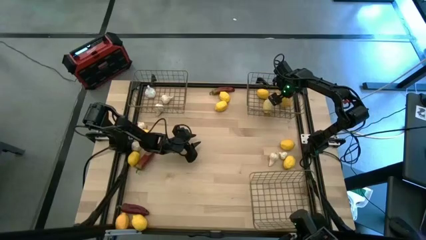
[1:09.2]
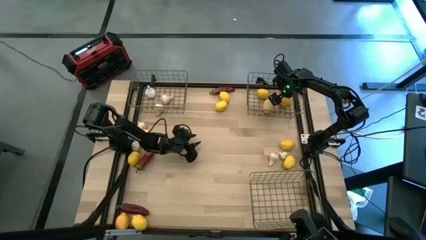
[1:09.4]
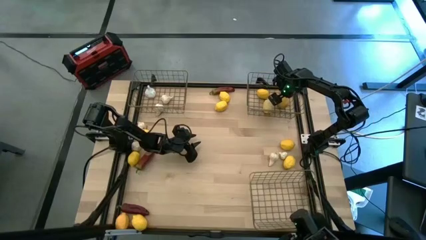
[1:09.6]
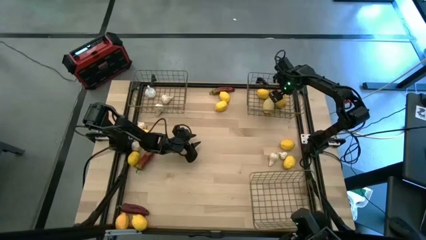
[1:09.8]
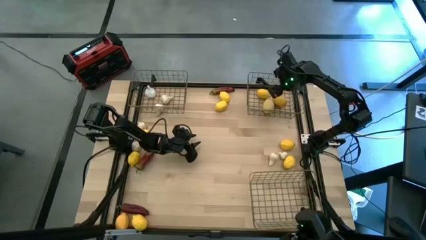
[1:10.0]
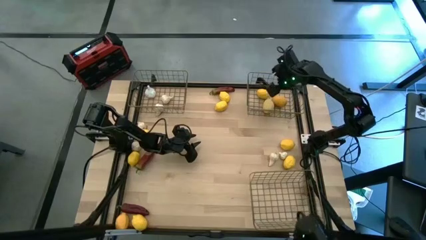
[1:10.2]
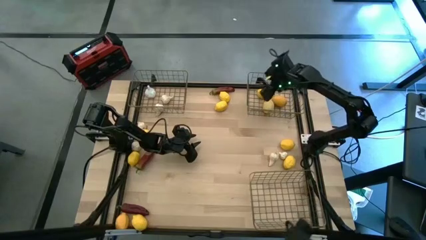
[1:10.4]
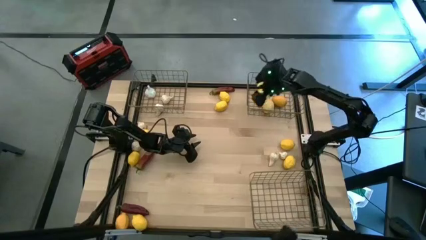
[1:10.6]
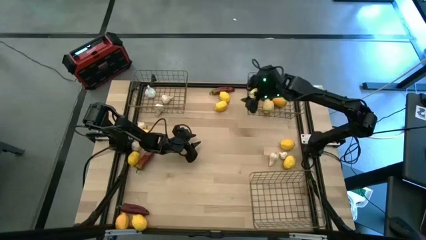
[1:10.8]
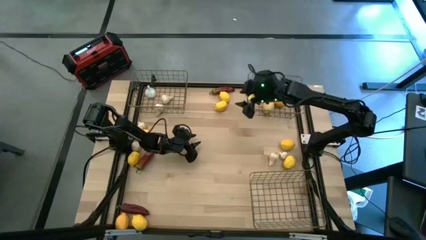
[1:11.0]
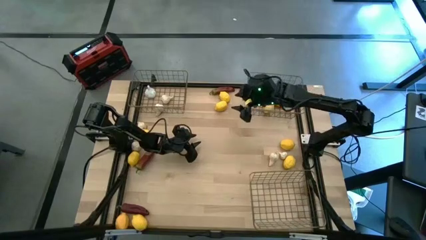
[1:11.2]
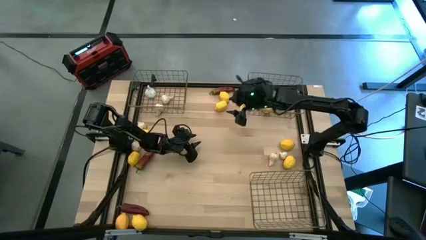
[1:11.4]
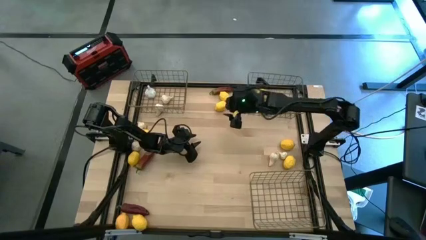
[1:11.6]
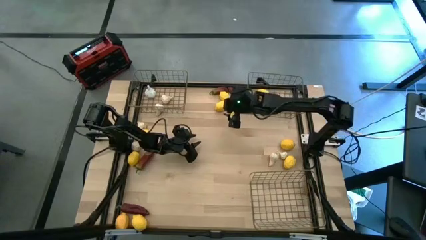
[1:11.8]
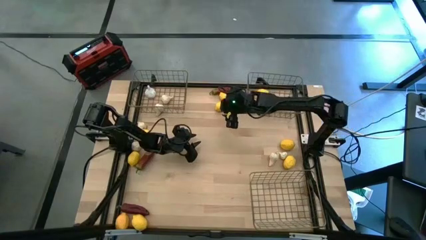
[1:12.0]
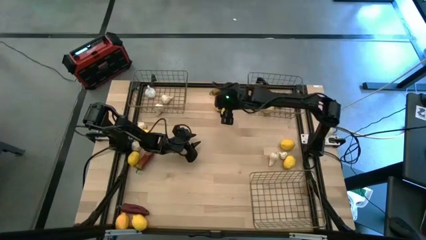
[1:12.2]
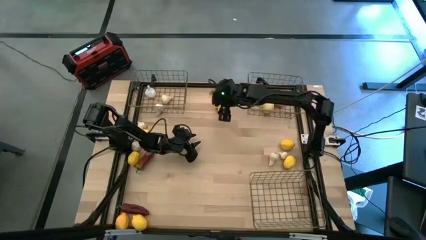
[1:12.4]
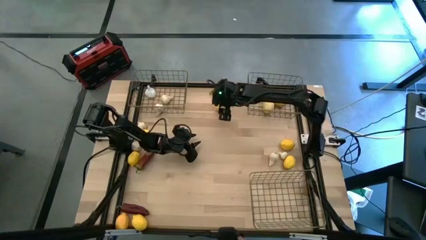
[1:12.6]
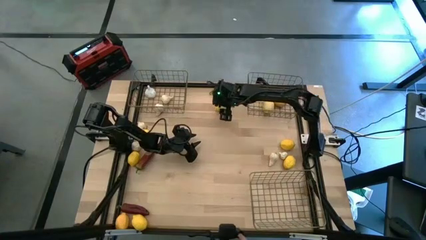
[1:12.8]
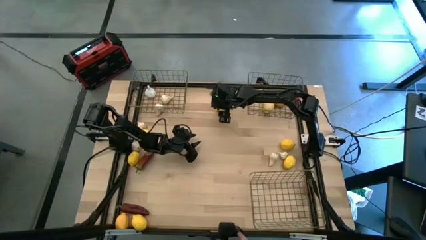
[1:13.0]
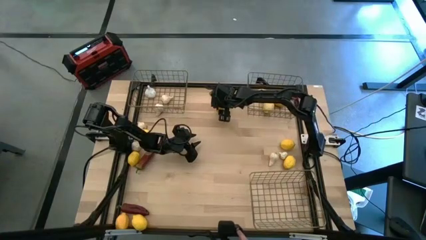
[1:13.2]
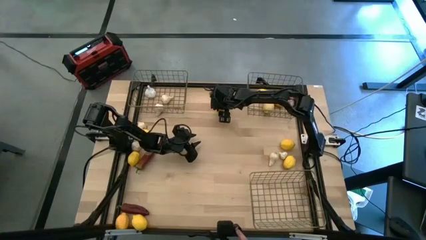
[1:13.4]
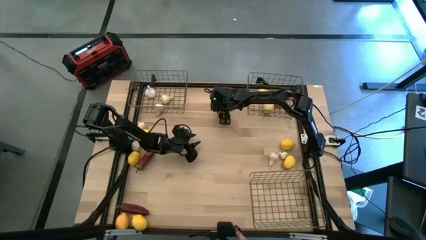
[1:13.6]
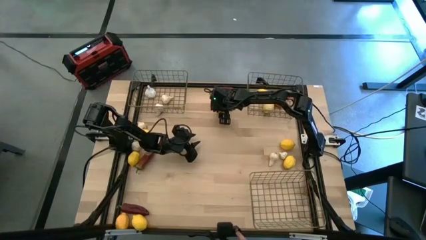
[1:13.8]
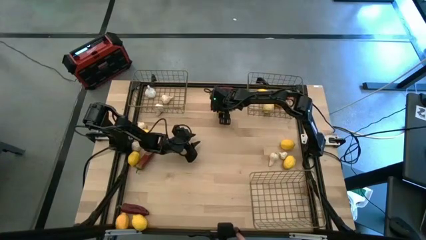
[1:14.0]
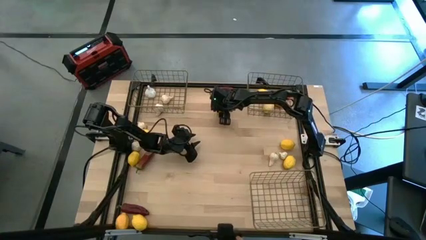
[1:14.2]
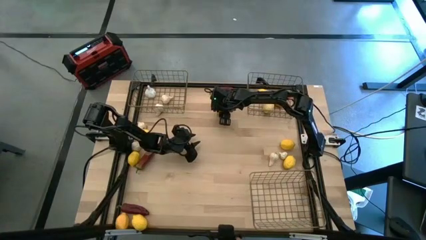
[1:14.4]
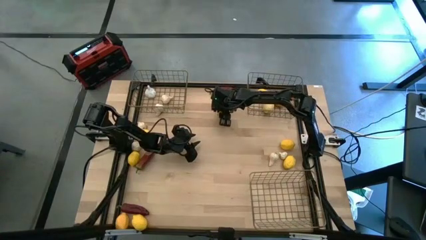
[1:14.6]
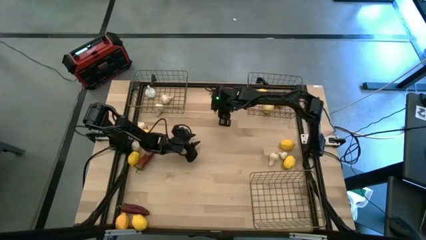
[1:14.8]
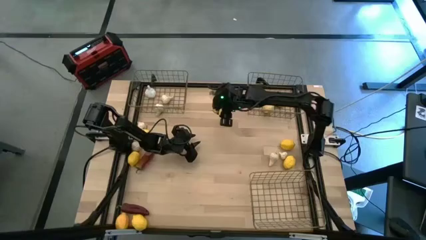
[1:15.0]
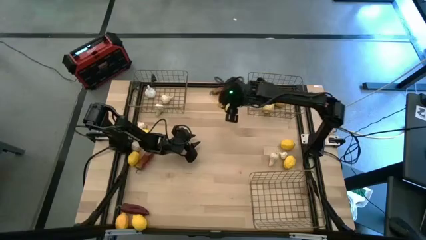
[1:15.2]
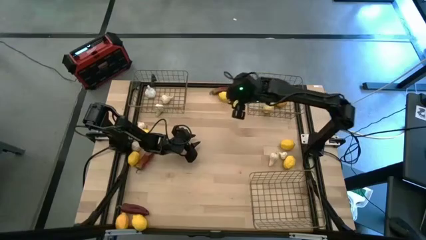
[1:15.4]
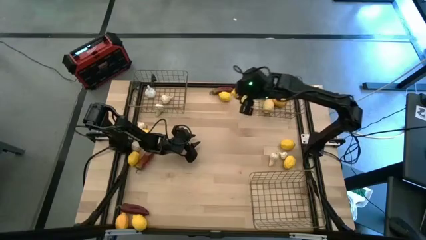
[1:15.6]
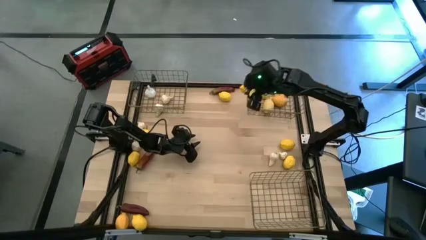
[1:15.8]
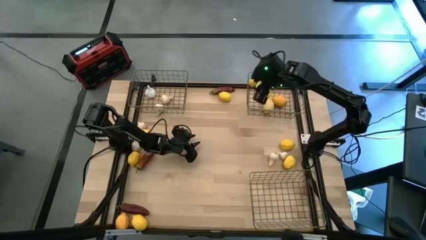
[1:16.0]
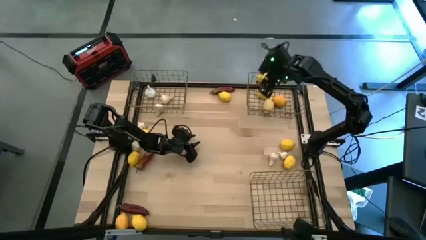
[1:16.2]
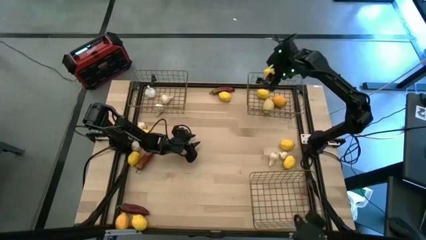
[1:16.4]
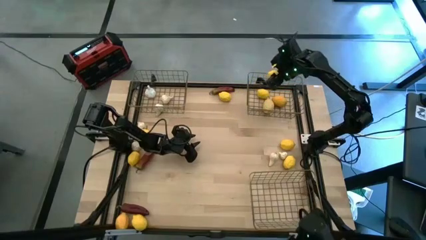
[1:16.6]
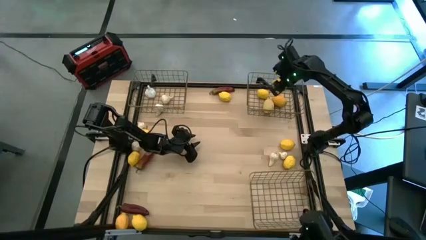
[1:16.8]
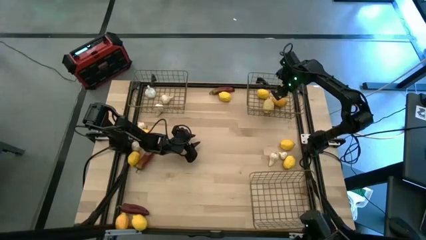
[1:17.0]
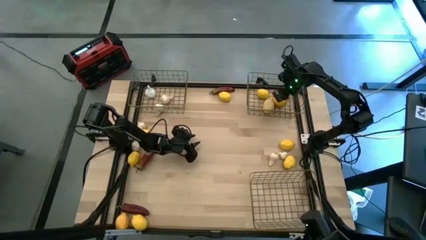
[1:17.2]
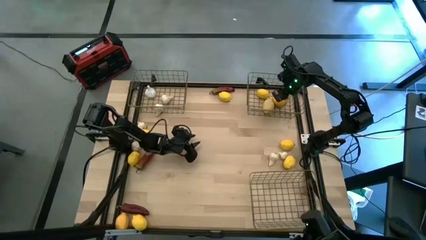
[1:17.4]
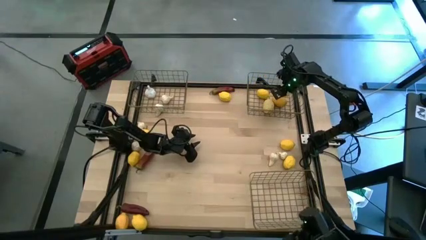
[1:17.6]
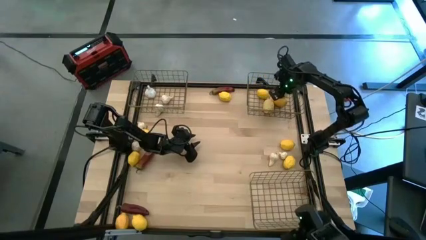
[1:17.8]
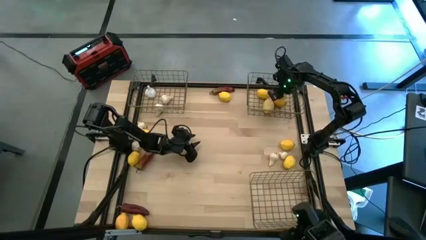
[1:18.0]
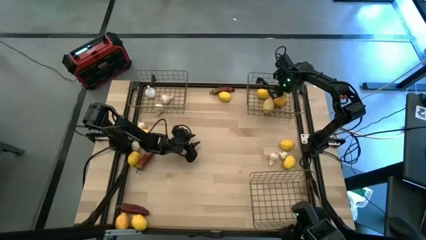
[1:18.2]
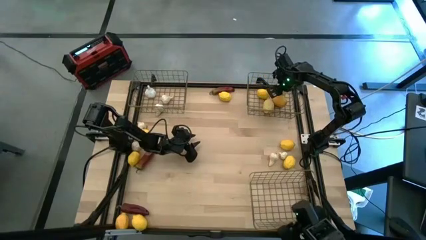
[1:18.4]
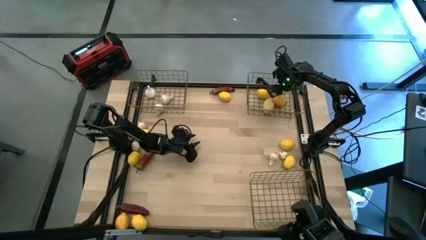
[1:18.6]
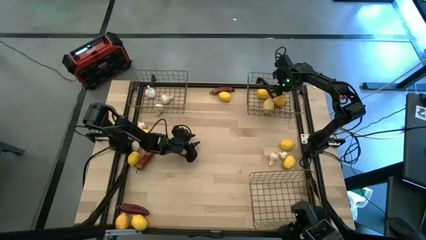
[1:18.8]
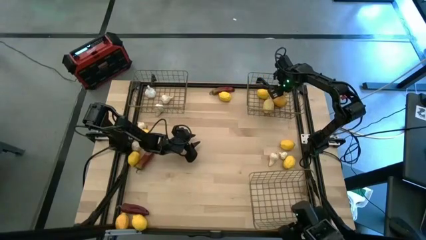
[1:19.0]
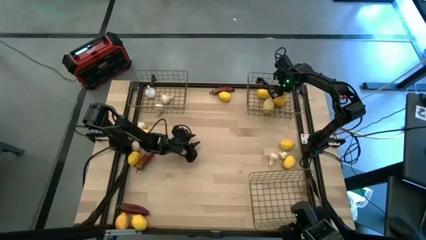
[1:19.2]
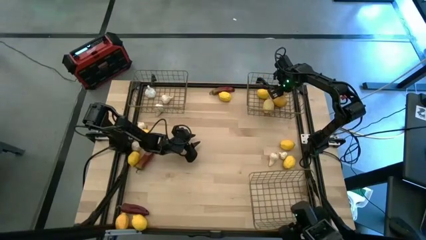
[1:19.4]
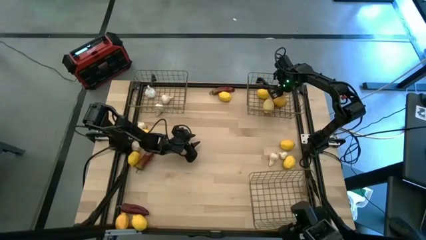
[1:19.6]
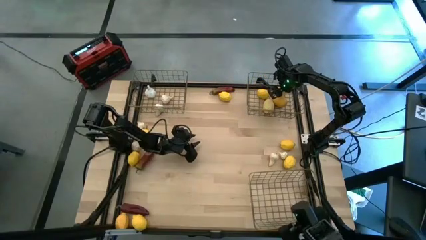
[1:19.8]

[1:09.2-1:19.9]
Task: Sort produce into baskets
Put the yellow lemon into the top right wire basket

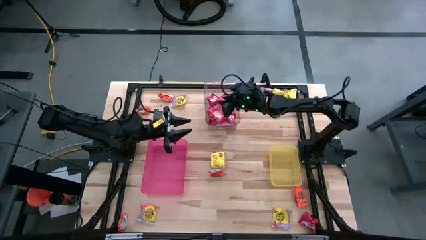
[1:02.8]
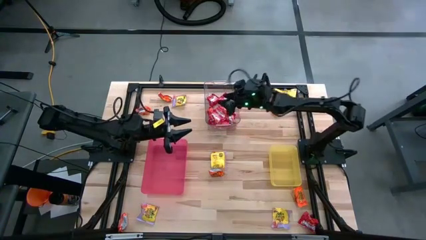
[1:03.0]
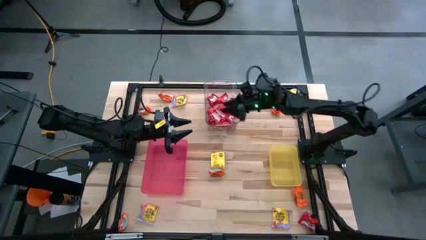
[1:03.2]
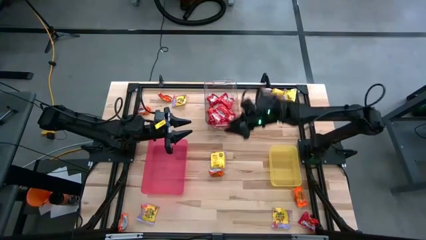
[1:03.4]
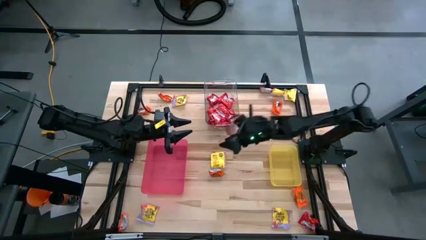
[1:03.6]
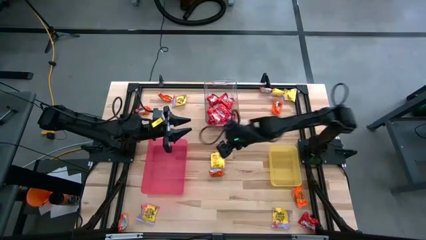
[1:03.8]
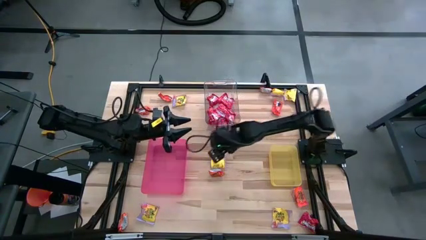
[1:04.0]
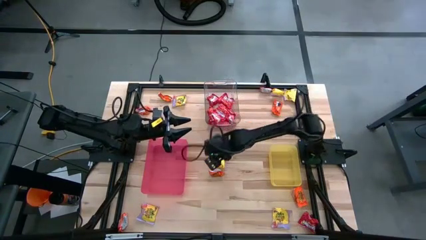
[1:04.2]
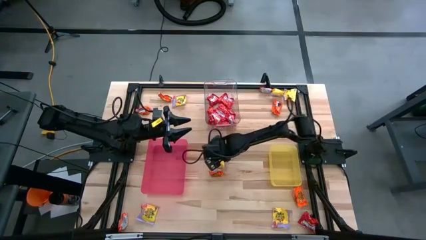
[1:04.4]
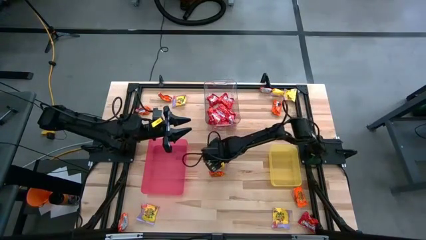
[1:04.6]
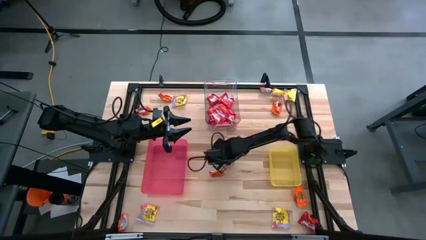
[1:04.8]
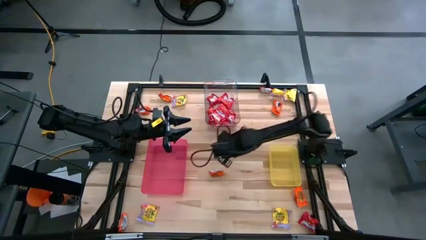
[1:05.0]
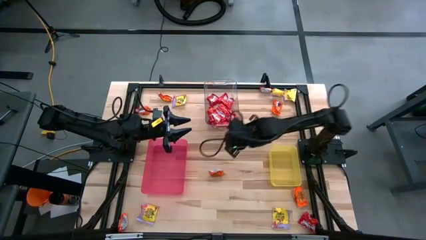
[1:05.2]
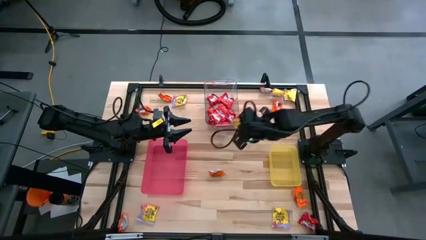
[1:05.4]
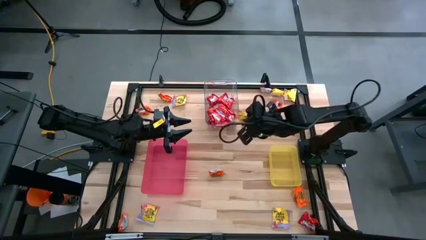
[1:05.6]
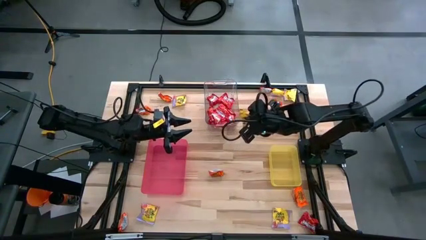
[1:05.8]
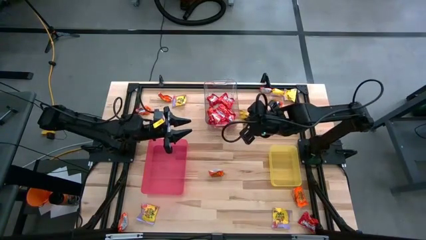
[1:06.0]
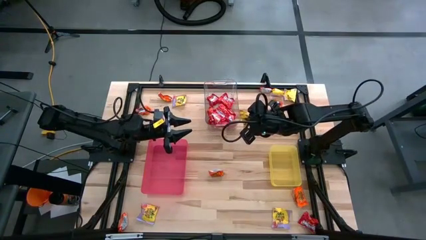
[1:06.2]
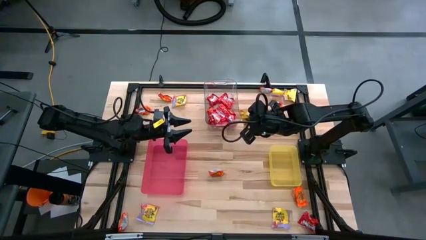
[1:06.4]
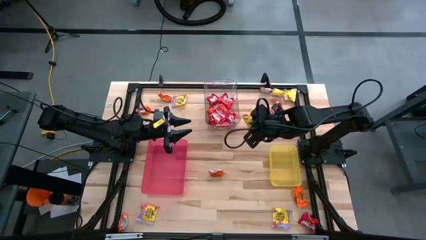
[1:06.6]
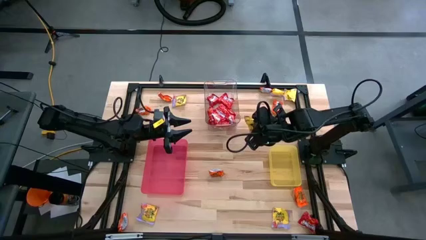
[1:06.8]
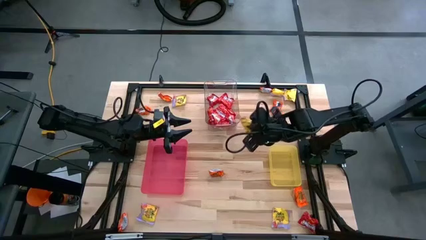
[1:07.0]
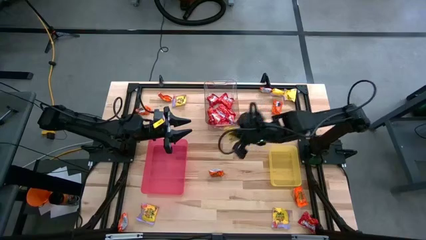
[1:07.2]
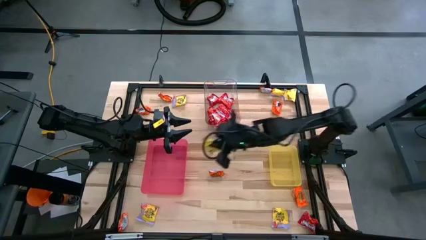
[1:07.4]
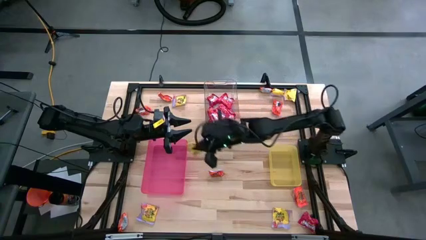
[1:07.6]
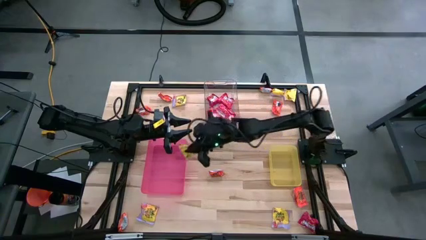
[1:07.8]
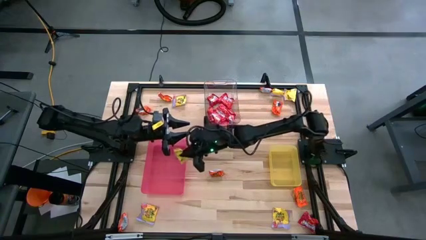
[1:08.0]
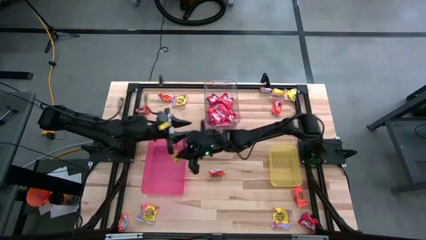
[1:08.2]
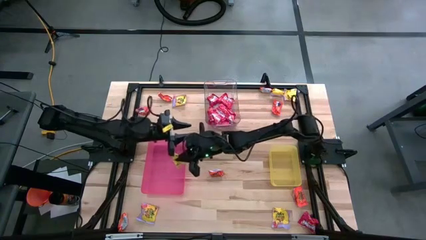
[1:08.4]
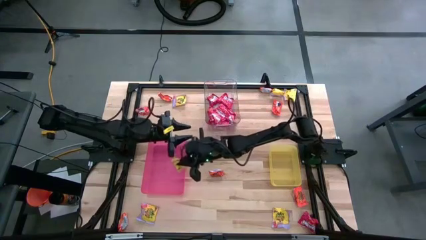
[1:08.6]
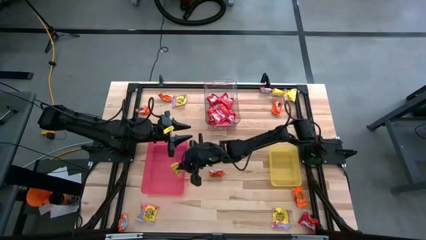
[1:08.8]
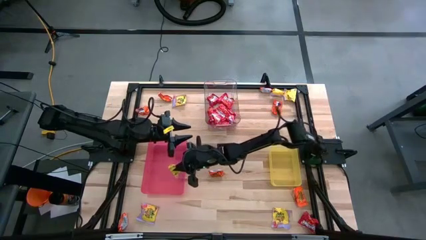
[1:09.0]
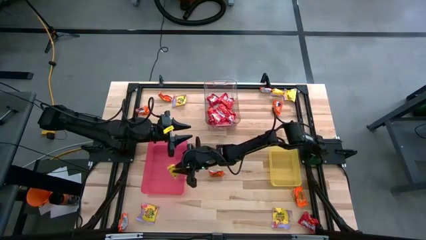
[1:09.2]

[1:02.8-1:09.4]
Task: Sort candy
Put the yellow candy into the pink bin
